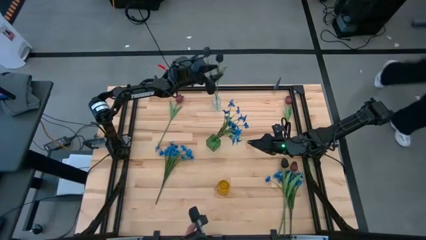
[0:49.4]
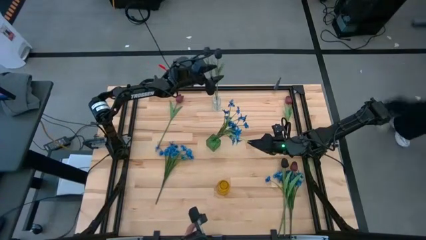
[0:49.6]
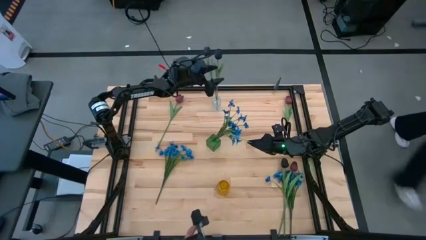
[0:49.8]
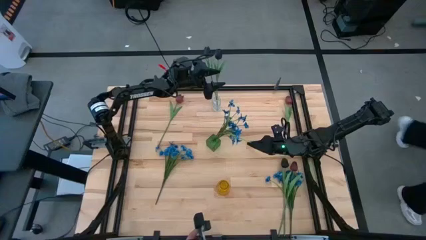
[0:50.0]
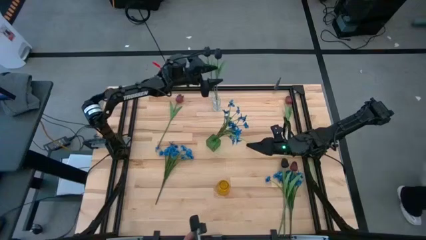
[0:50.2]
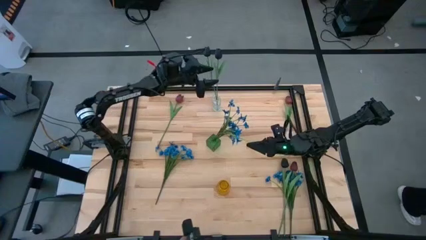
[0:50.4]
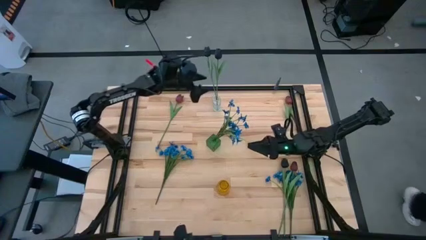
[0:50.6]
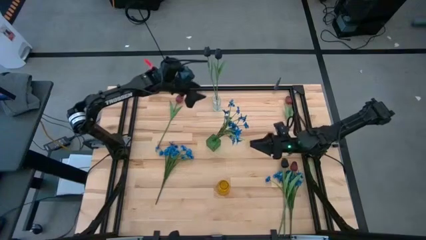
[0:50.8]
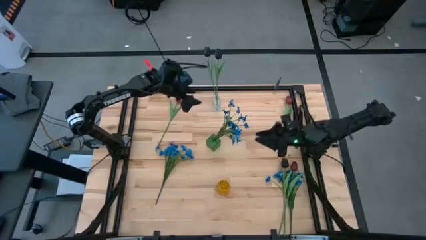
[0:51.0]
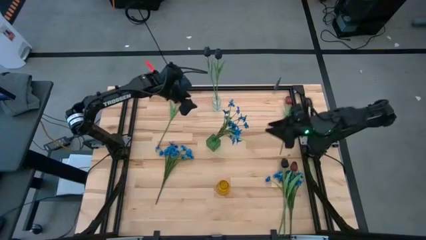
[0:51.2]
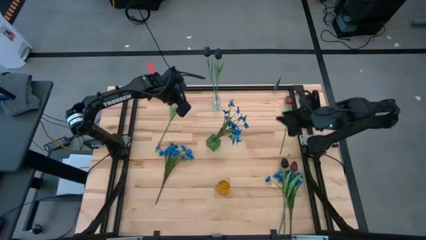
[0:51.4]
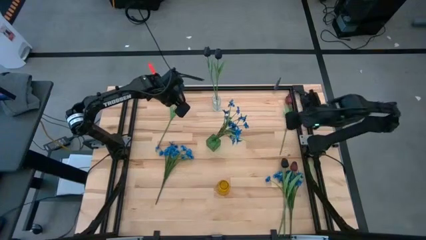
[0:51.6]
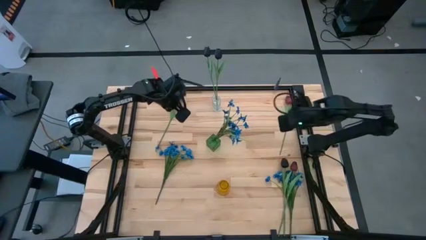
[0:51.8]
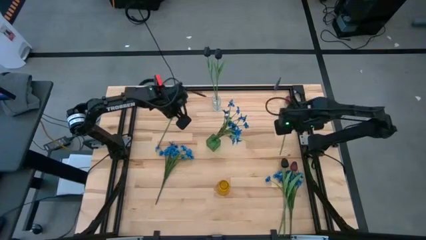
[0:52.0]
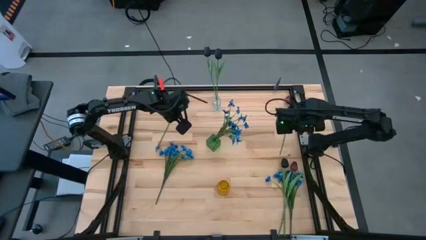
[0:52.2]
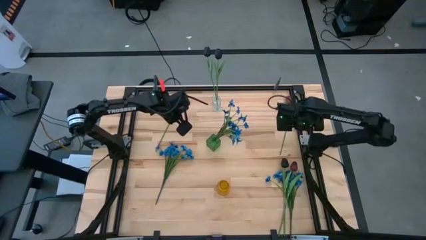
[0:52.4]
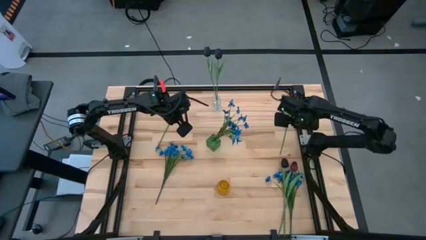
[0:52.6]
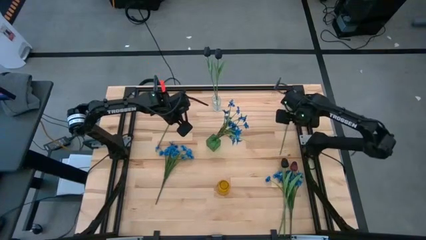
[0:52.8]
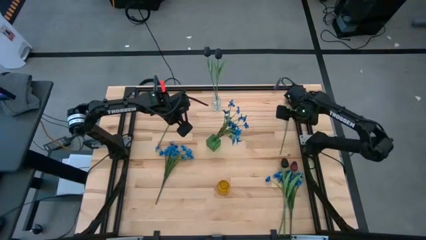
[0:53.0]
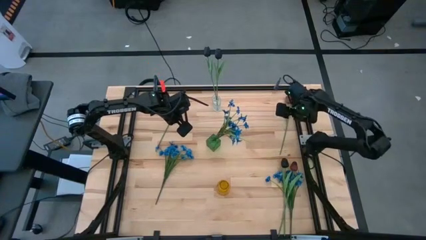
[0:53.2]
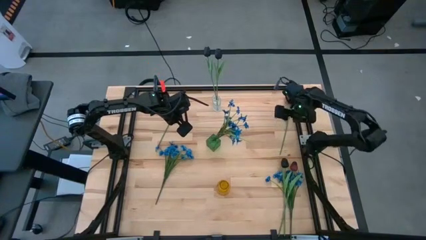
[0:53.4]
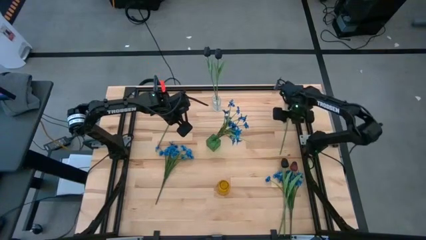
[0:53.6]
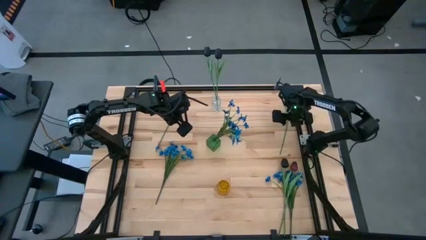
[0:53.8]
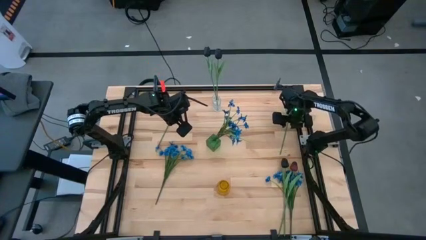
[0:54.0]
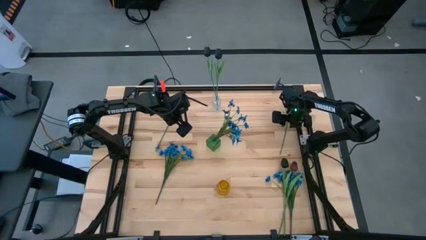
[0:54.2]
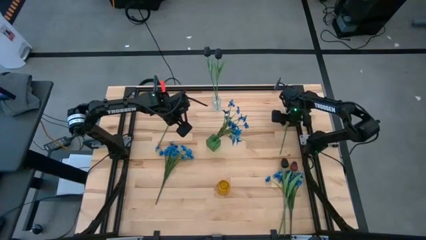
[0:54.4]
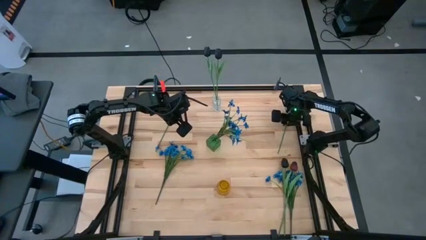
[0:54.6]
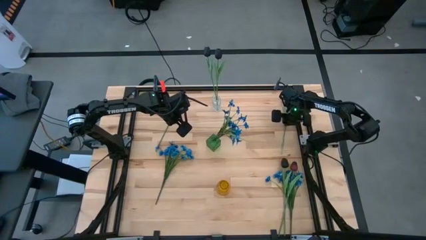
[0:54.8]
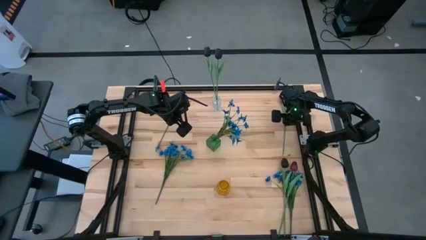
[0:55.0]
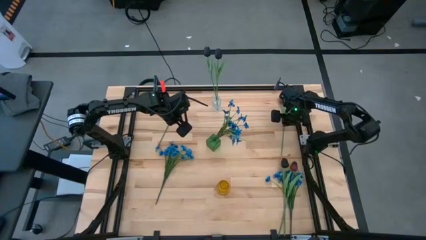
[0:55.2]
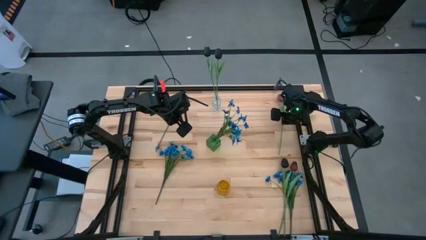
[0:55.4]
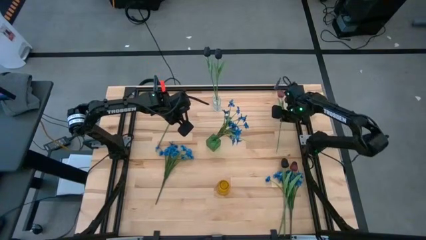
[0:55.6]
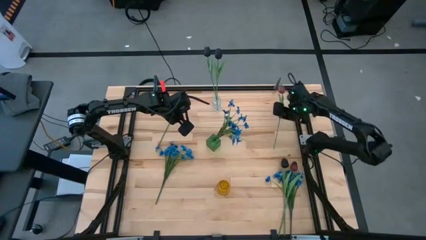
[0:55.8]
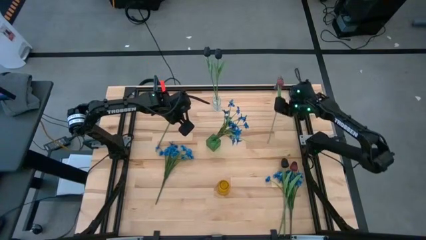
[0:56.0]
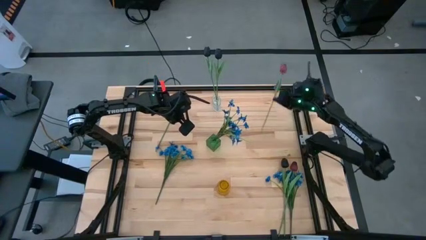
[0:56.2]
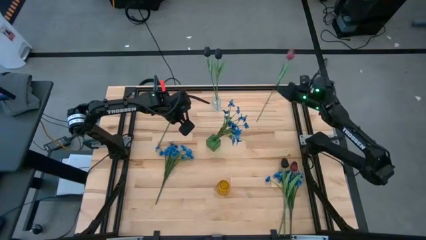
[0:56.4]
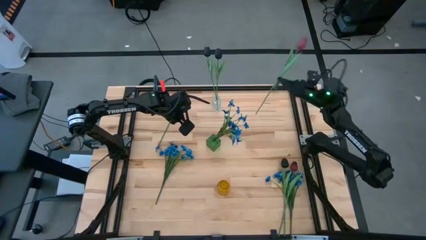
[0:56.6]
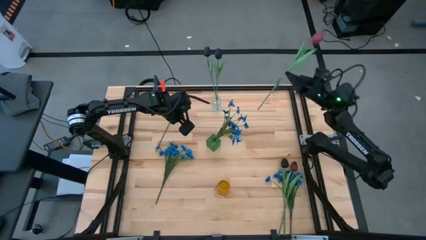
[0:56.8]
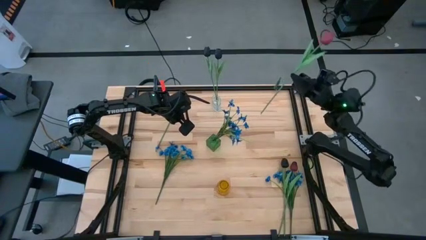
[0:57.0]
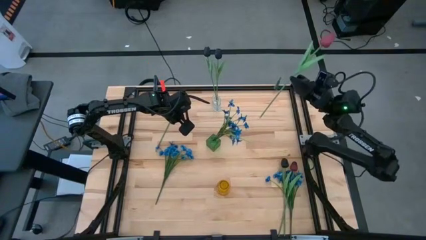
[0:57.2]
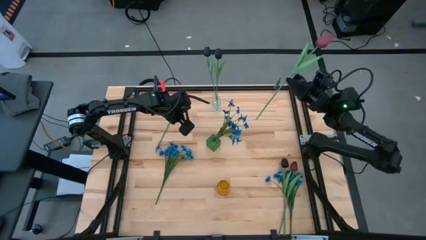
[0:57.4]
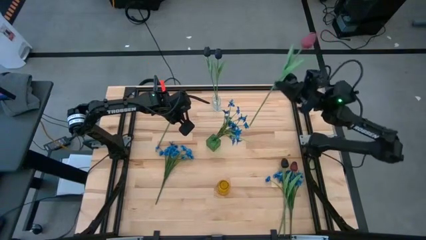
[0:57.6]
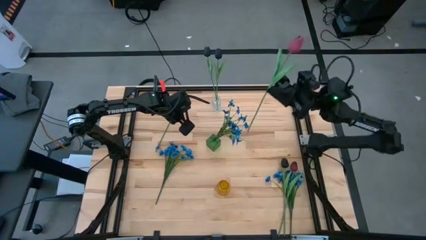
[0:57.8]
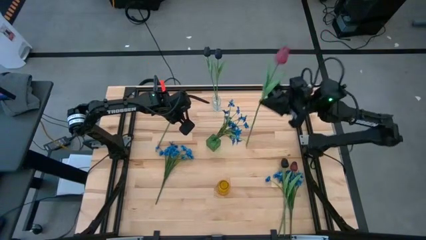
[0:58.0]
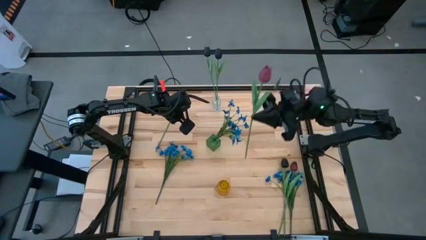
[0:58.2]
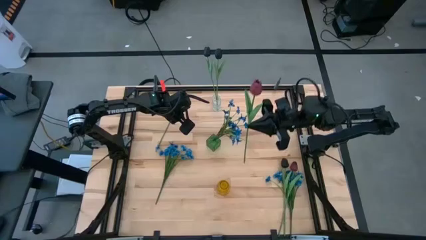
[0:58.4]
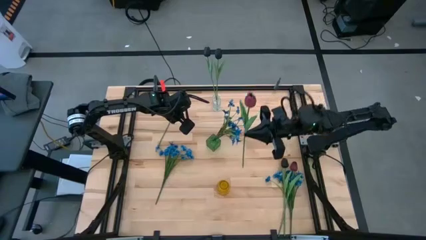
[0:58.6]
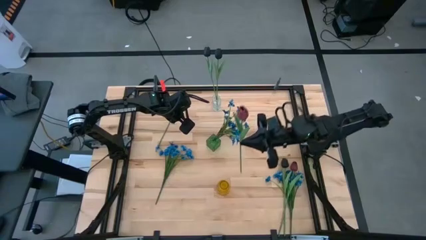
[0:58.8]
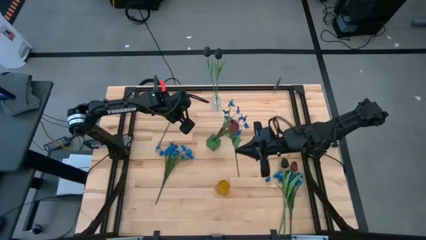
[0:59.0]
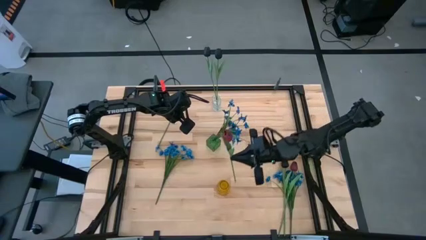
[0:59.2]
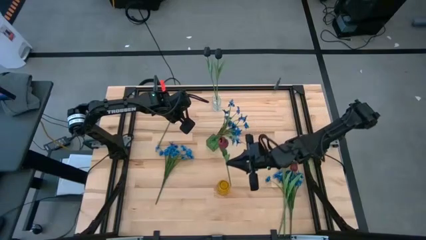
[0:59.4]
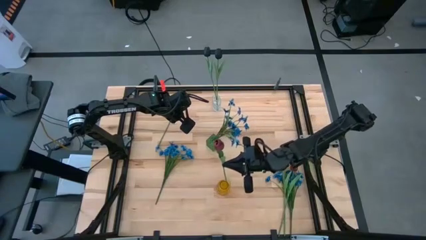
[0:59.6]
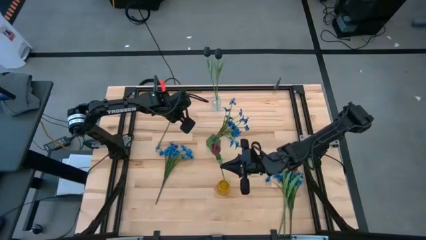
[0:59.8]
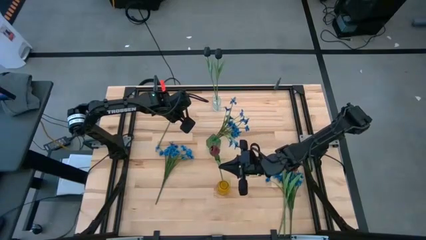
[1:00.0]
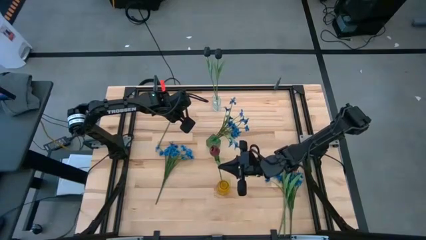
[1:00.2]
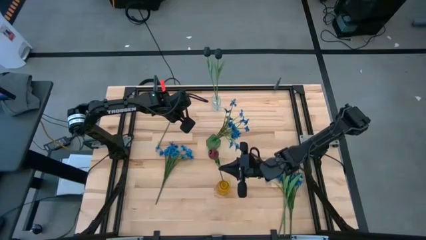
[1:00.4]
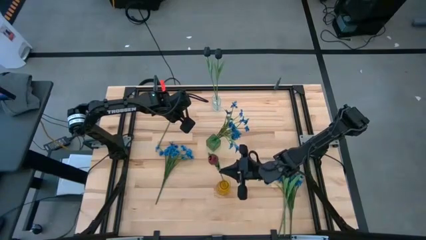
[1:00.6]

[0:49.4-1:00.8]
Task: Sort flowers into vase by color
Put the top right red tulip into the yellow vase
